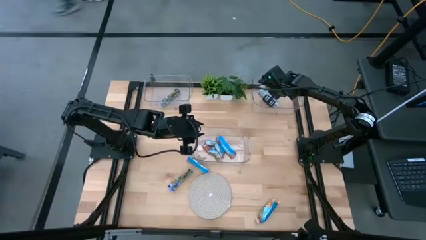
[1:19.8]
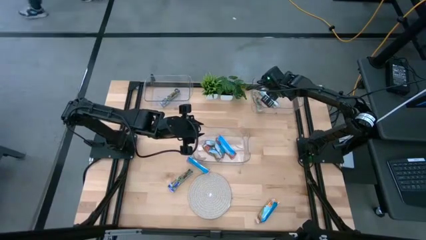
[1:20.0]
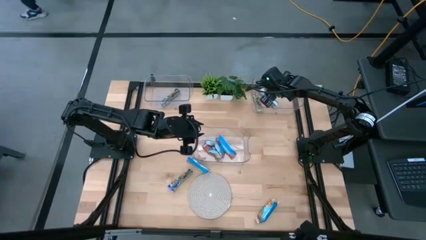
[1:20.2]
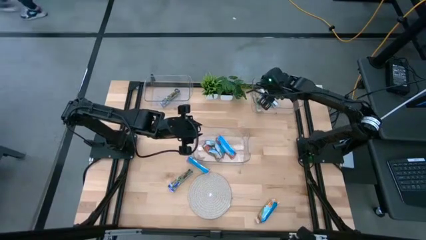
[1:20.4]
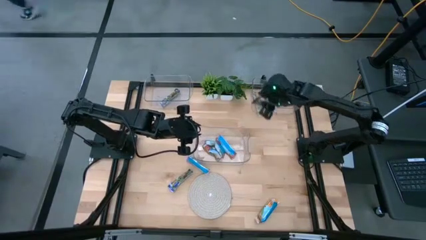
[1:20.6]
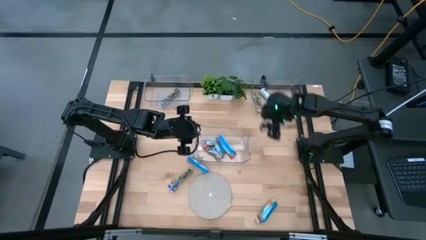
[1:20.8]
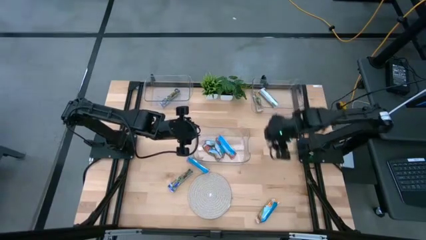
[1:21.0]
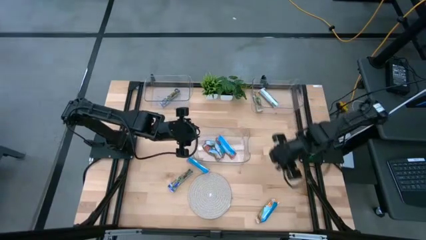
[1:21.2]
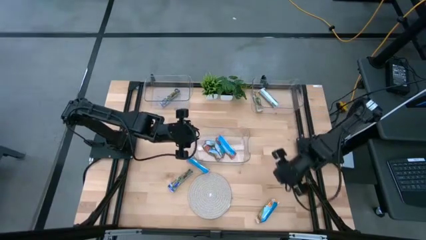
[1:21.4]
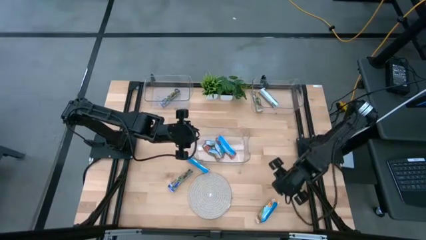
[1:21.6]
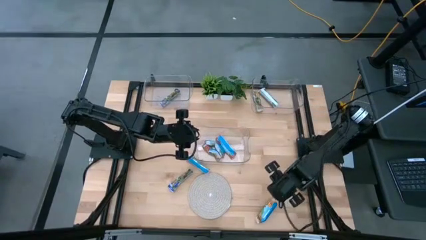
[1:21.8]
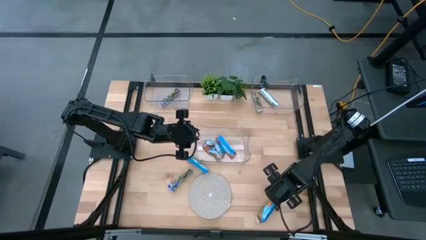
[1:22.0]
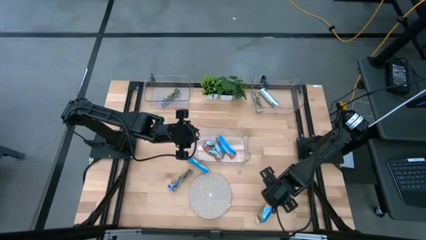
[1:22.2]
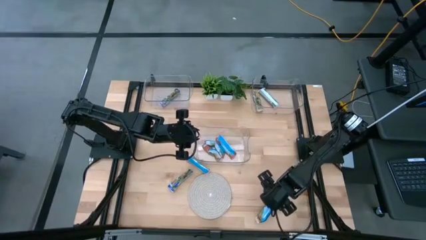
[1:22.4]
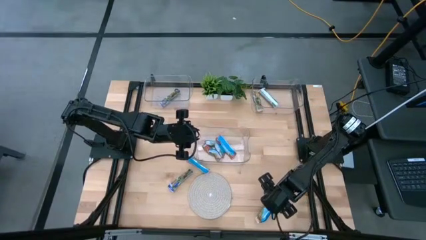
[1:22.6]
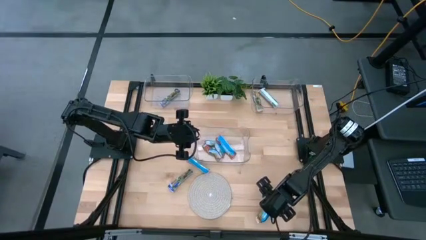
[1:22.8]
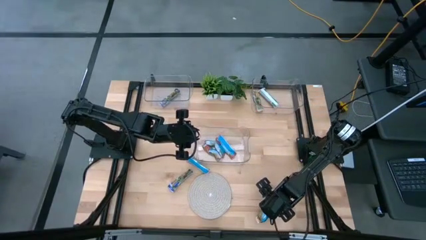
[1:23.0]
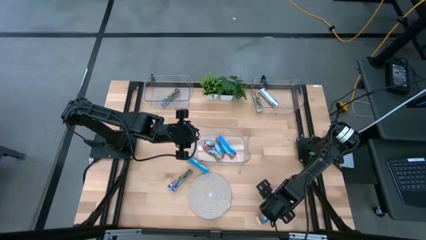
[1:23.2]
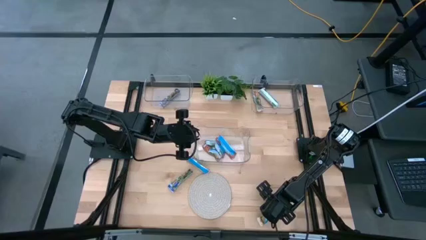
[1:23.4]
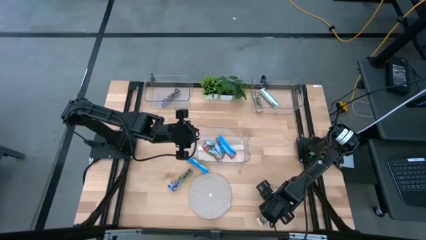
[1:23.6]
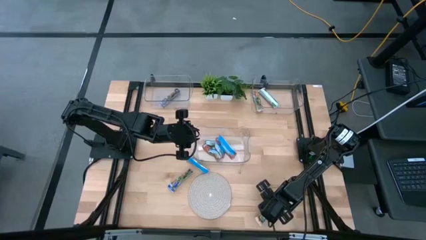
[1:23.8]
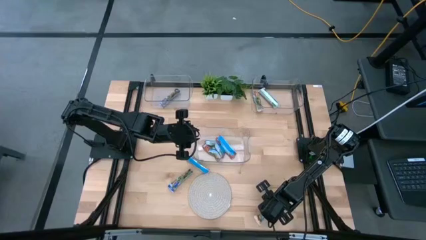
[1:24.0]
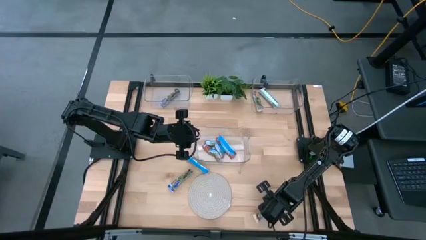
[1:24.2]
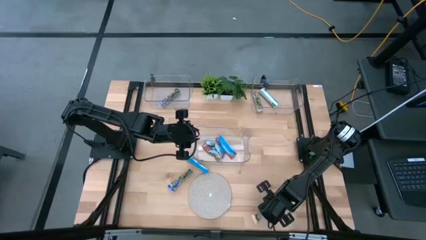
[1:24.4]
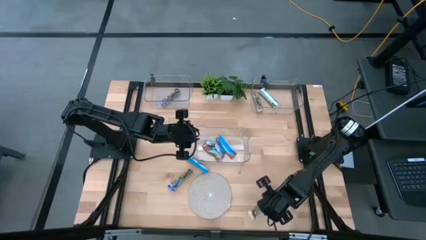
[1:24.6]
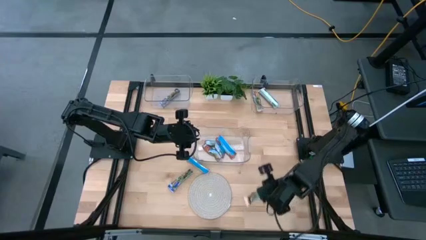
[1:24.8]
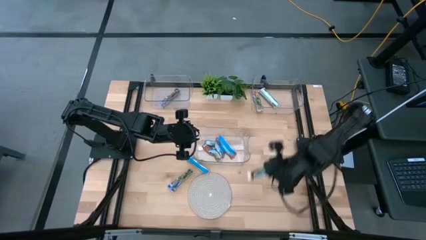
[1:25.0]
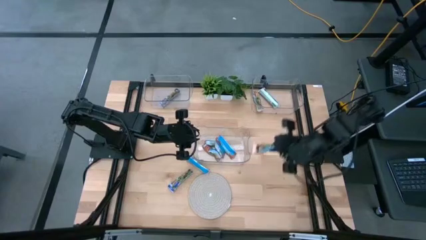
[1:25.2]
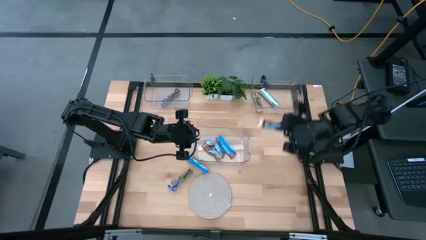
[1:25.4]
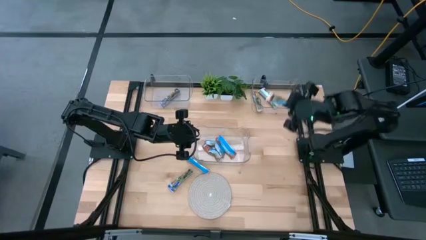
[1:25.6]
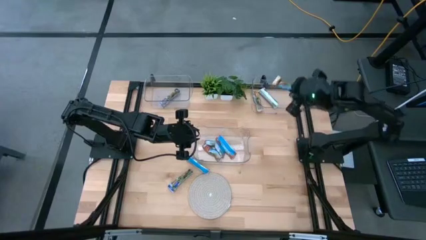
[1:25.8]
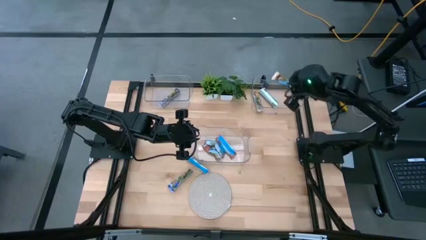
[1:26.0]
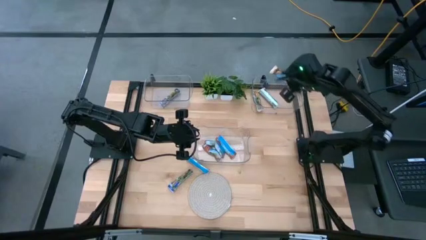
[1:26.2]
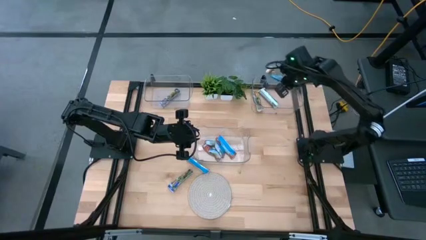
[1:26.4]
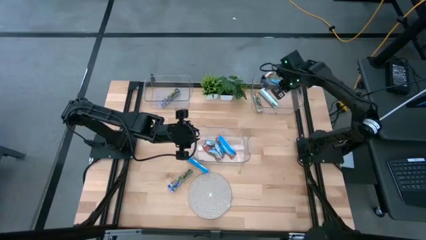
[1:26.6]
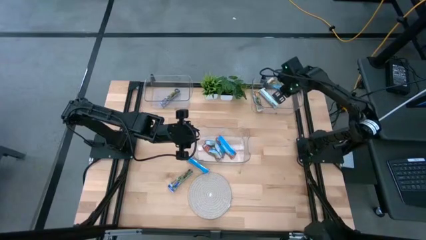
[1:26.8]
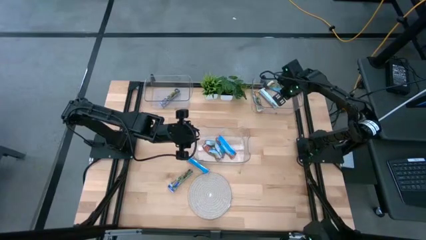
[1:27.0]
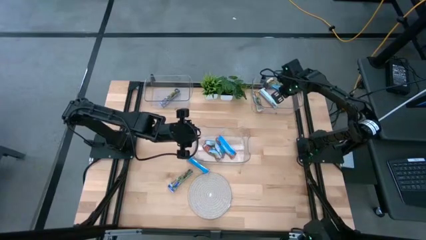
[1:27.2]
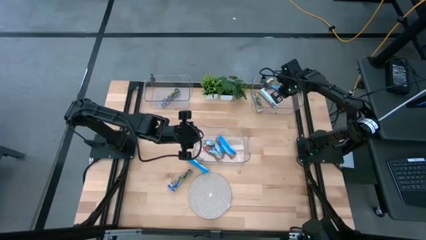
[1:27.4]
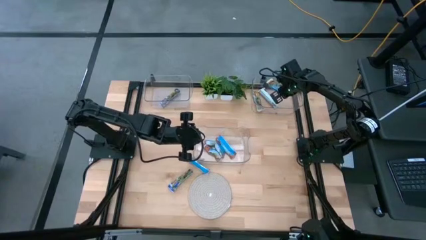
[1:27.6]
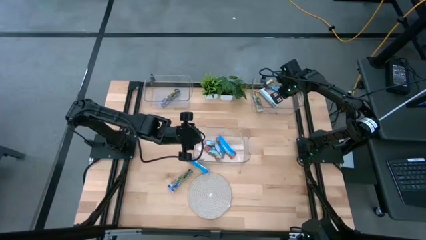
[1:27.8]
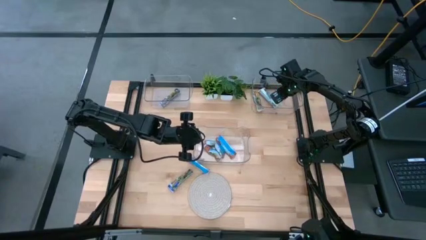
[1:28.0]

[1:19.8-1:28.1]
Task: Pick and place Granola Bars by type
Put the orange granola bar into the right transparent bin

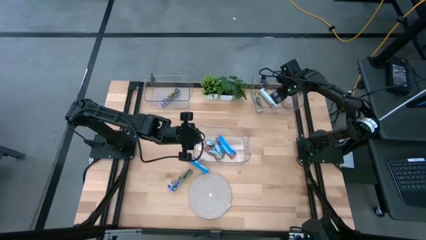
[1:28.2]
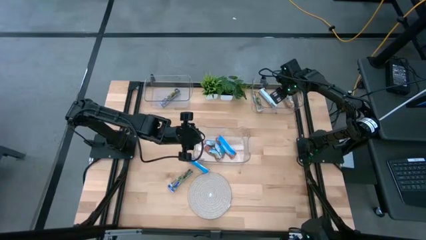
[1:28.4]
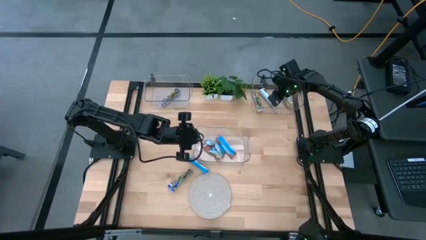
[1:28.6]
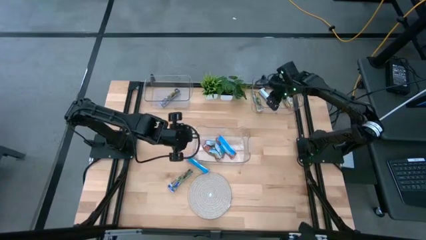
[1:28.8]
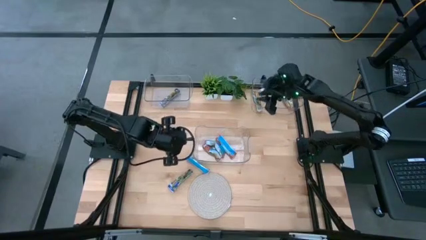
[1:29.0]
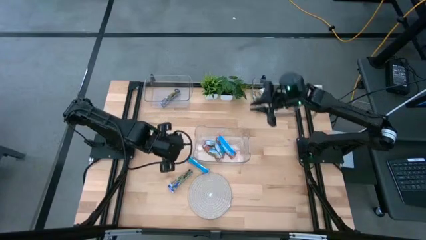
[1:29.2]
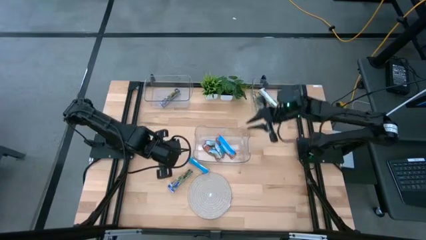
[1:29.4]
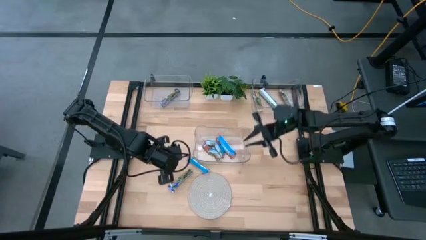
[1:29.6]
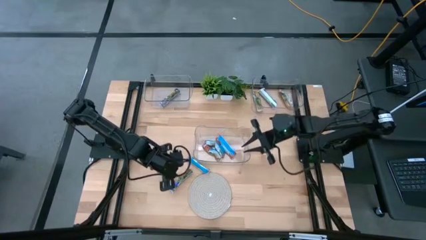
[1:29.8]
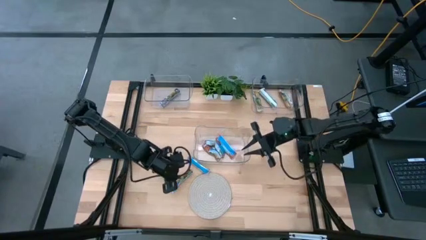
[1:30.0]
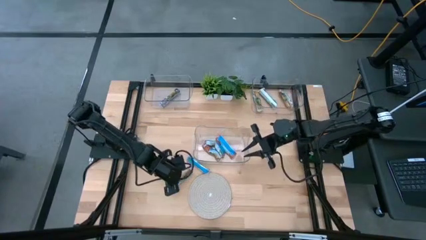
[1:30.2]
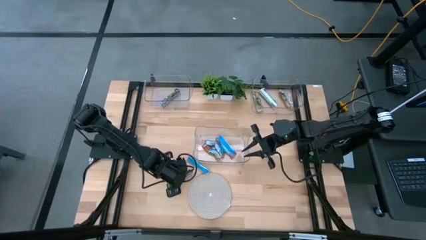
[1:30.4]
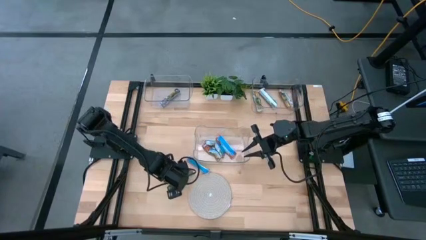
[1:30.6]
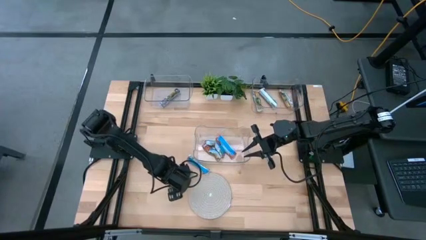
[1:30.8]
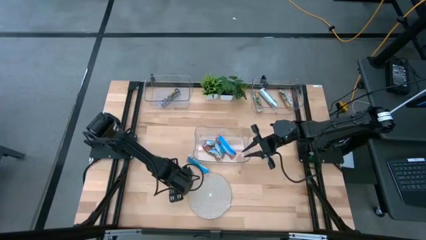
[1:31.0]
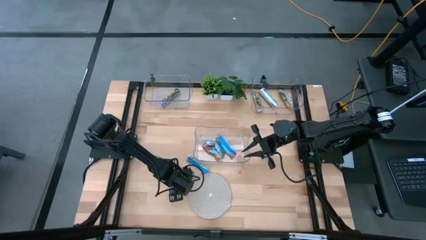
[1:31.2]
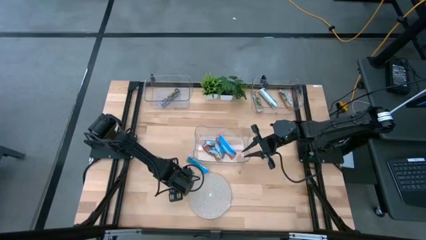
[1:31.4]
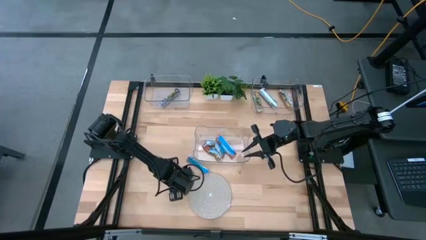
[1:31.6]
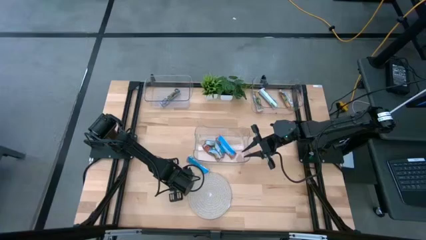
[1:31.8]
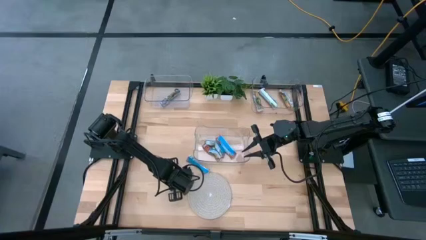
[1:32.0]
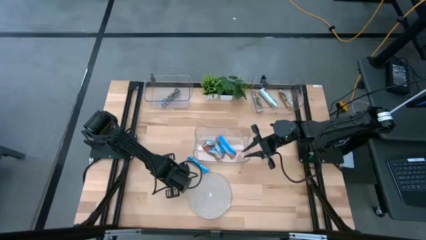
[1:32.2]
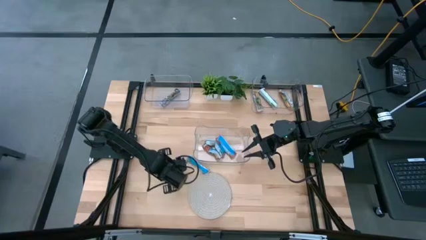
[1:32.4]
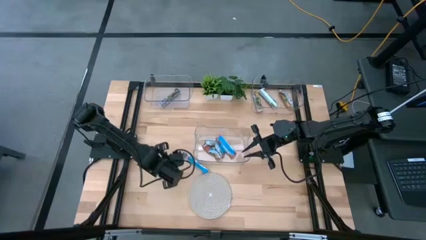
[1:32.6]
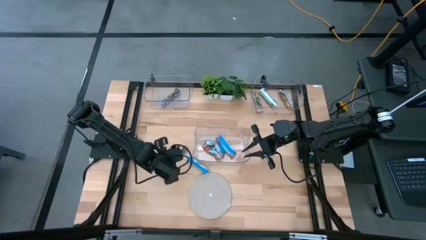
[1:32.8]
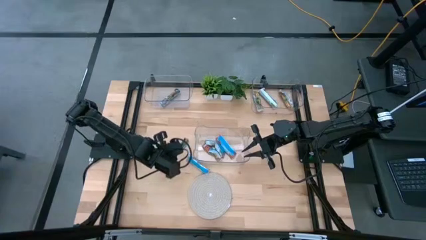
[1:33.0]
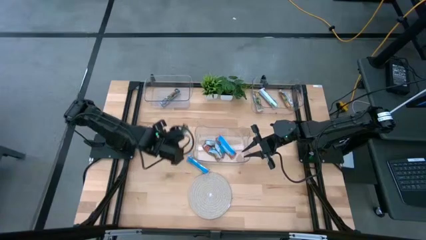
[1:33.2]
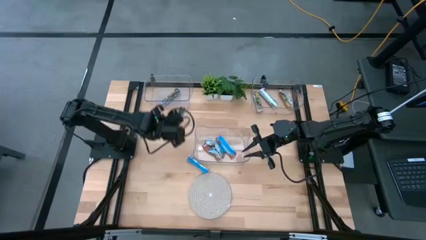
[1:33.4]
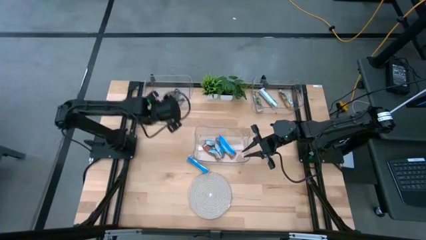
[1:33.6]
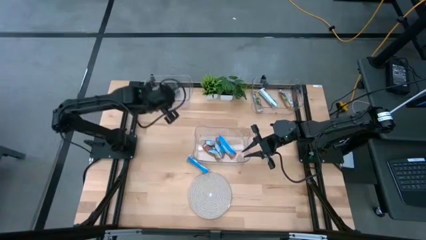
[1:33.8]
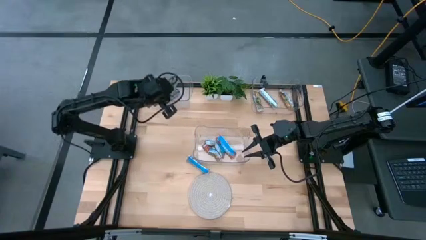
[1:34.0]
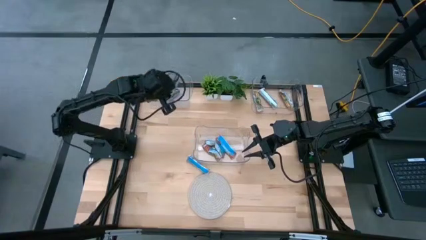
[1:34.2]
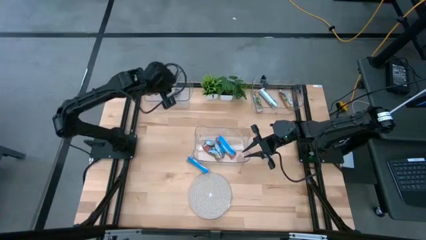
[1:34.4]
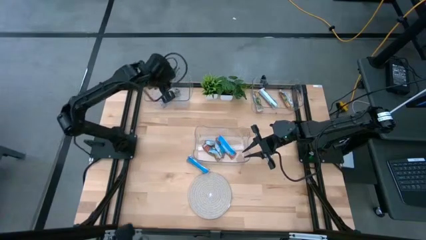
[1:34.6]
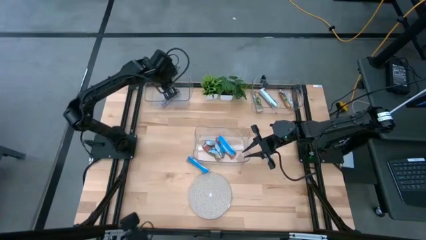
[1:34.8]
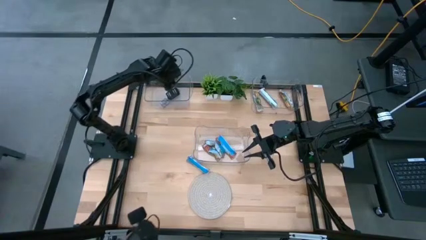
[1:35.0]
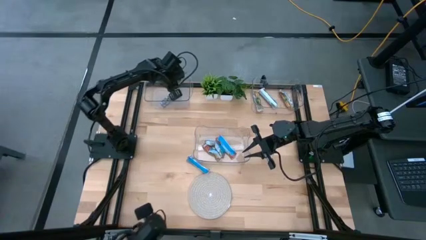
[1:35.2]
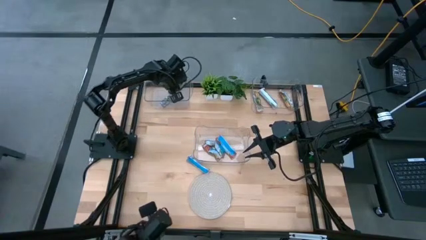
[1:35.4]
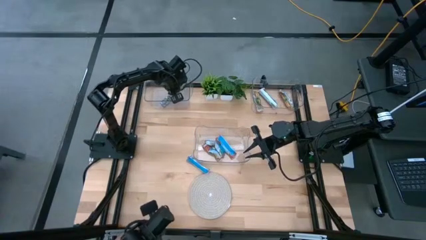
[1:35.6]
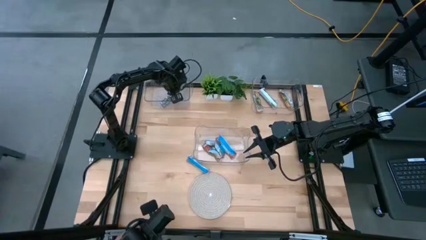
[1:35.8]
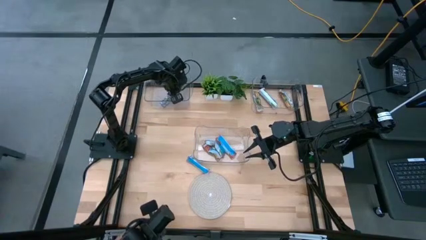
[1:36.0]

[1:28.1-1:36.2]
Put the blue granola bar into the left transparent bin
